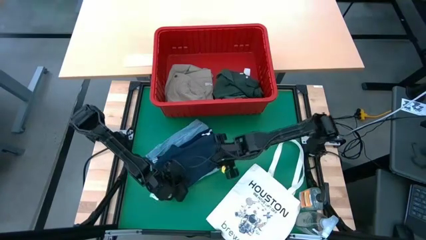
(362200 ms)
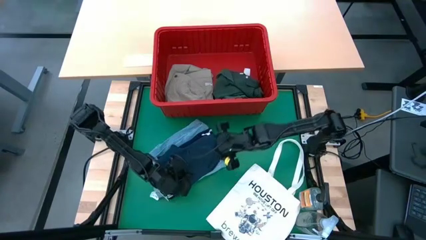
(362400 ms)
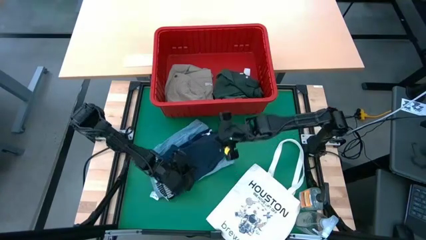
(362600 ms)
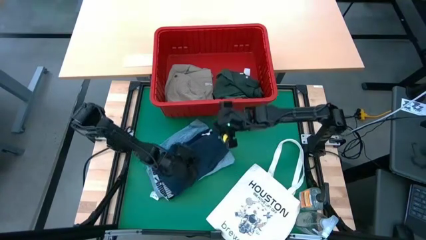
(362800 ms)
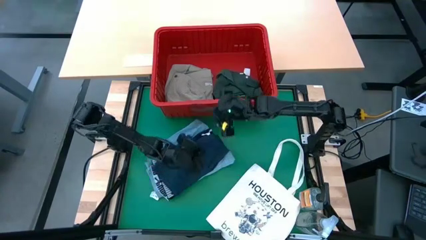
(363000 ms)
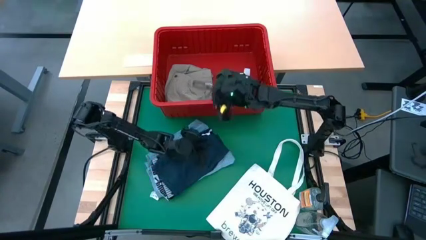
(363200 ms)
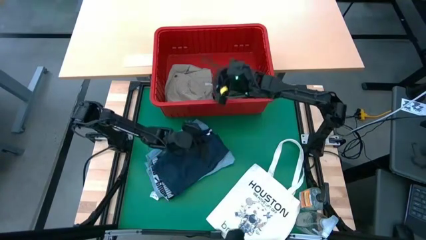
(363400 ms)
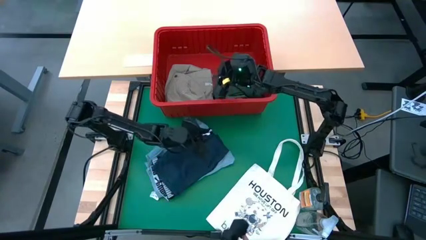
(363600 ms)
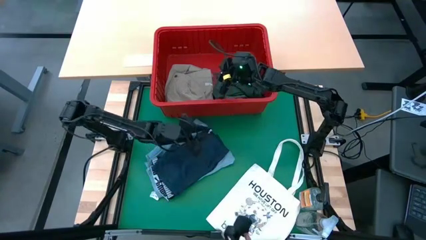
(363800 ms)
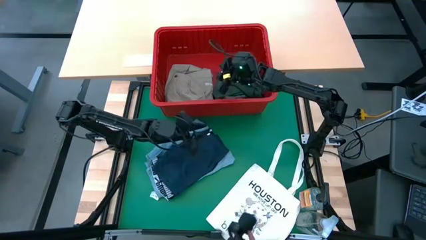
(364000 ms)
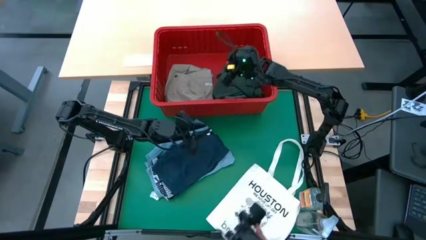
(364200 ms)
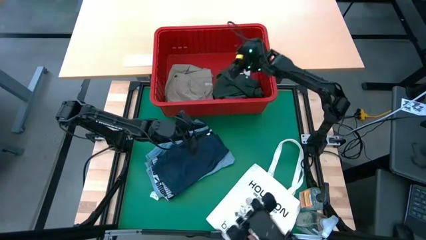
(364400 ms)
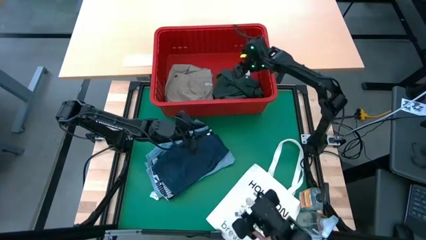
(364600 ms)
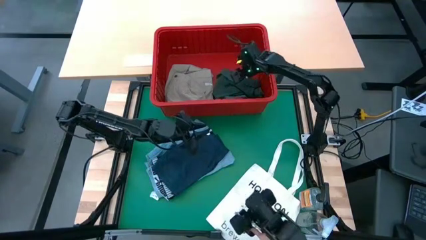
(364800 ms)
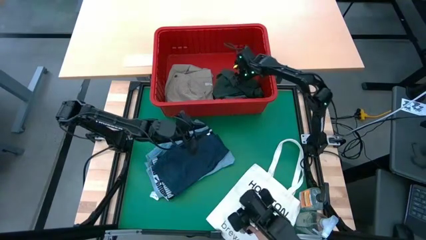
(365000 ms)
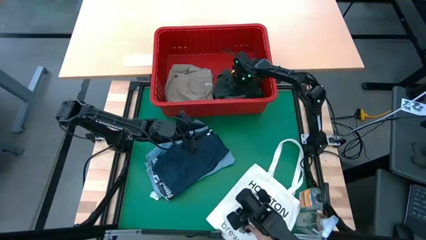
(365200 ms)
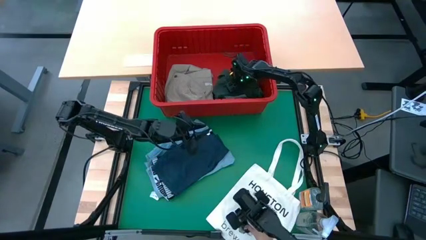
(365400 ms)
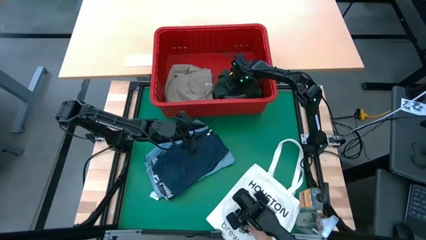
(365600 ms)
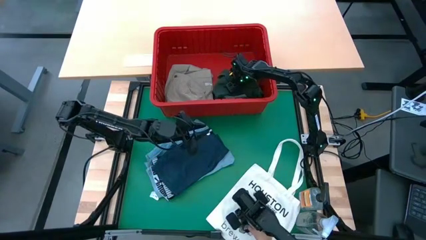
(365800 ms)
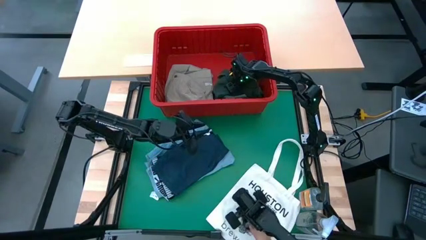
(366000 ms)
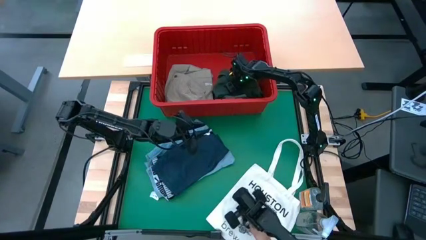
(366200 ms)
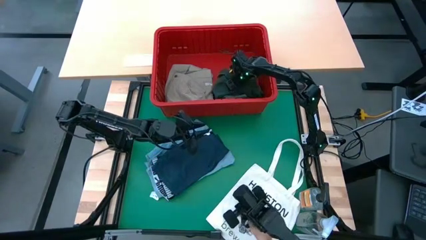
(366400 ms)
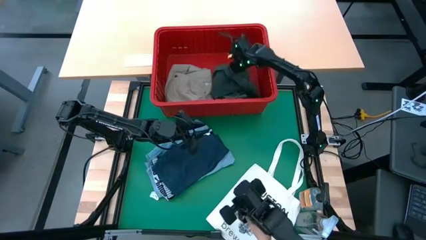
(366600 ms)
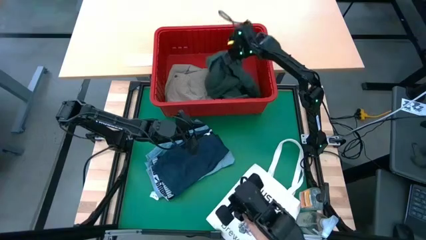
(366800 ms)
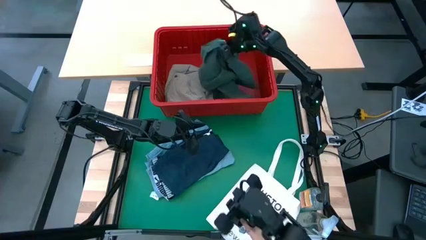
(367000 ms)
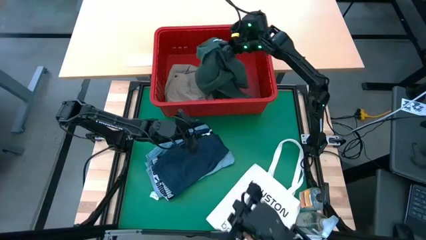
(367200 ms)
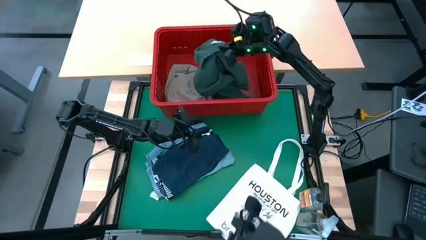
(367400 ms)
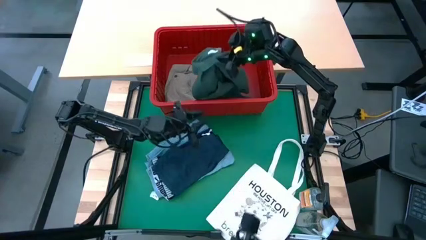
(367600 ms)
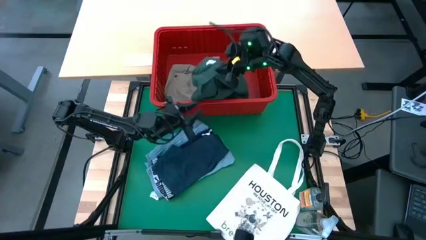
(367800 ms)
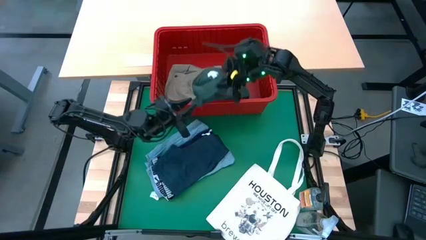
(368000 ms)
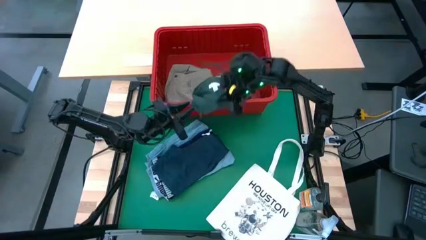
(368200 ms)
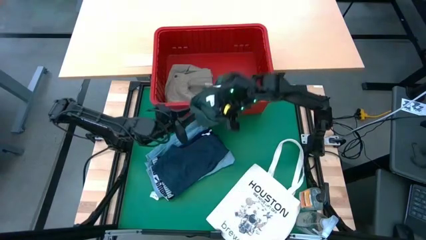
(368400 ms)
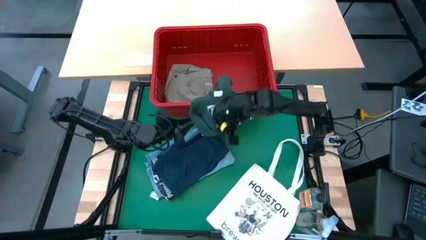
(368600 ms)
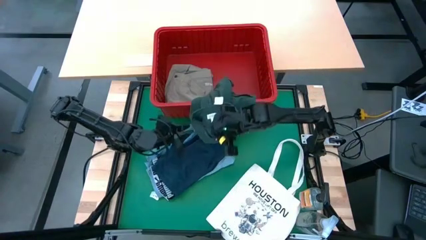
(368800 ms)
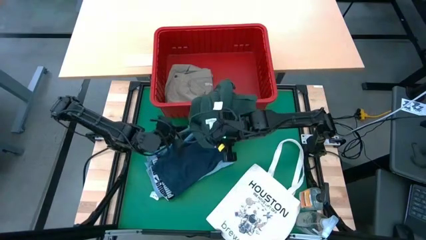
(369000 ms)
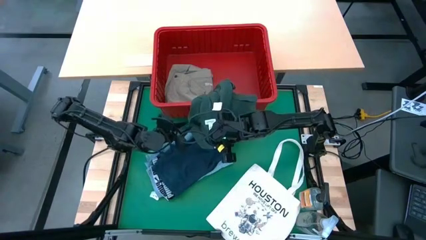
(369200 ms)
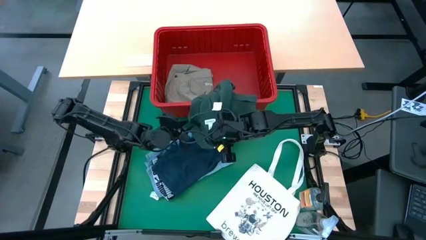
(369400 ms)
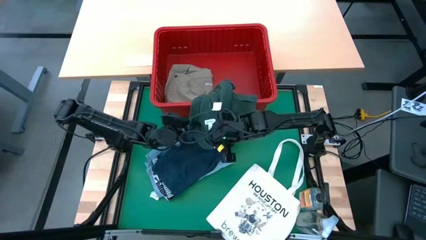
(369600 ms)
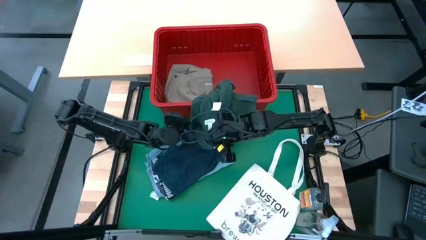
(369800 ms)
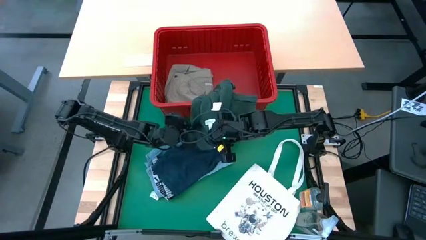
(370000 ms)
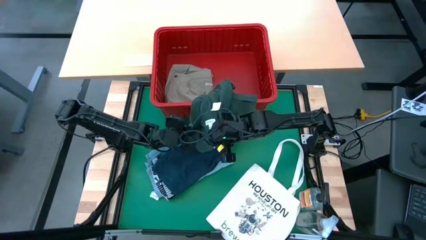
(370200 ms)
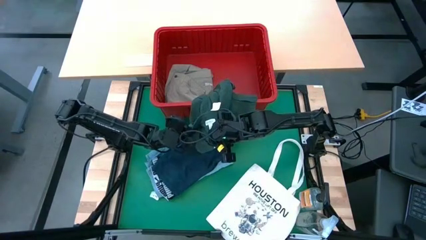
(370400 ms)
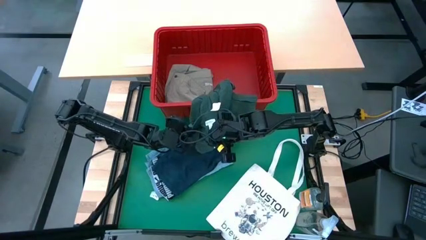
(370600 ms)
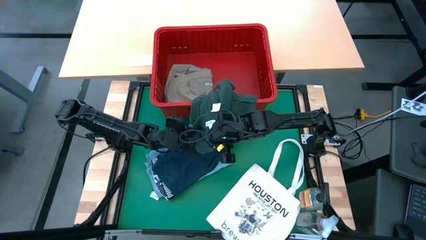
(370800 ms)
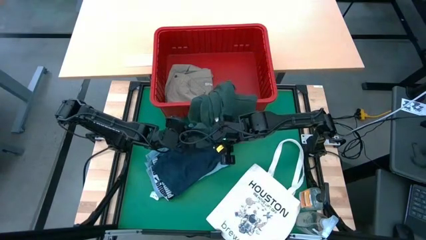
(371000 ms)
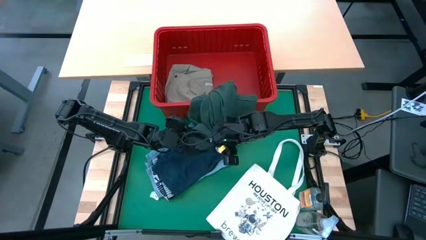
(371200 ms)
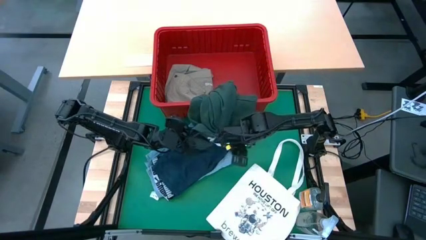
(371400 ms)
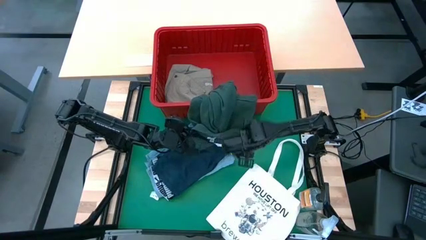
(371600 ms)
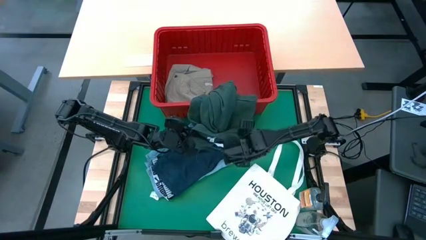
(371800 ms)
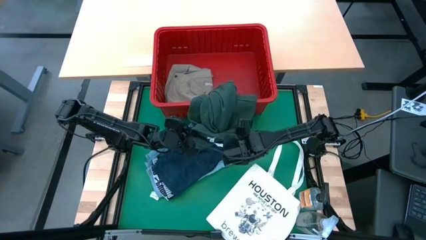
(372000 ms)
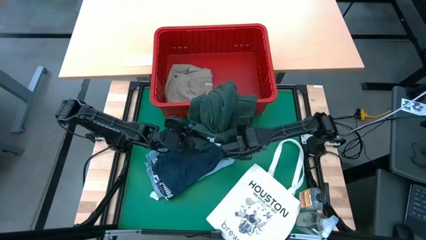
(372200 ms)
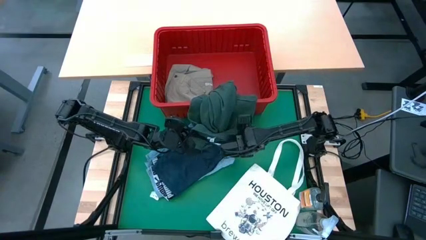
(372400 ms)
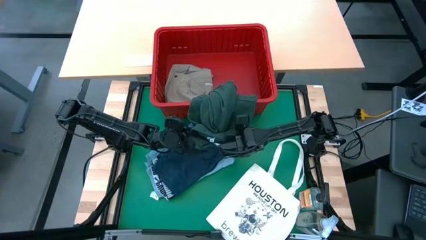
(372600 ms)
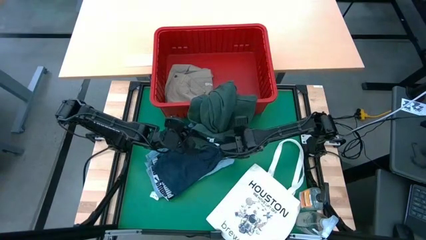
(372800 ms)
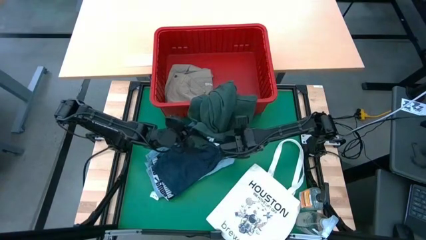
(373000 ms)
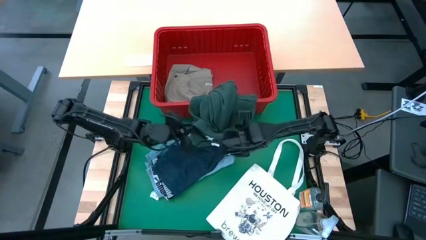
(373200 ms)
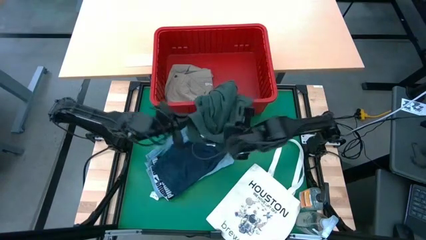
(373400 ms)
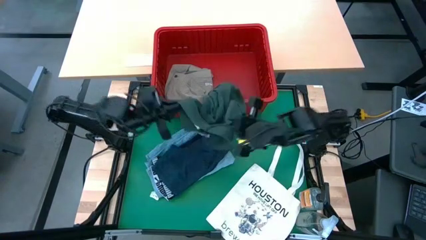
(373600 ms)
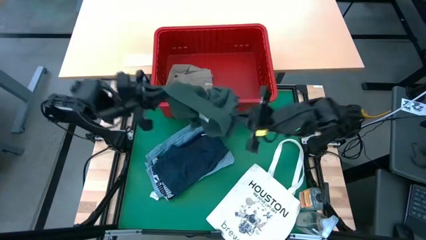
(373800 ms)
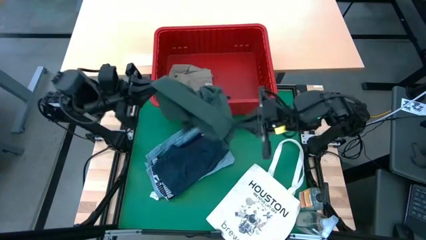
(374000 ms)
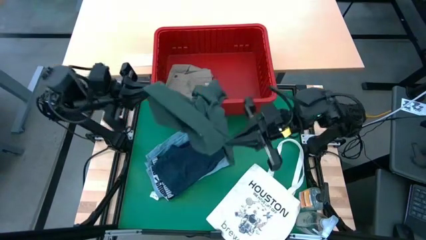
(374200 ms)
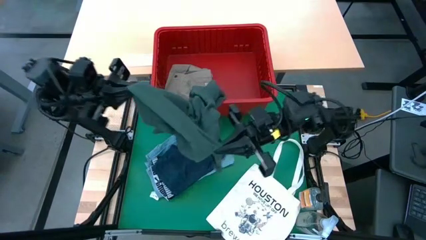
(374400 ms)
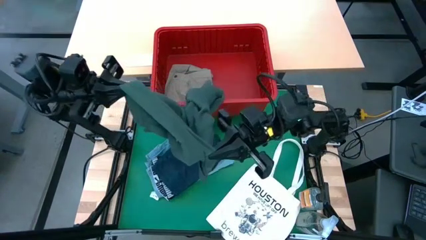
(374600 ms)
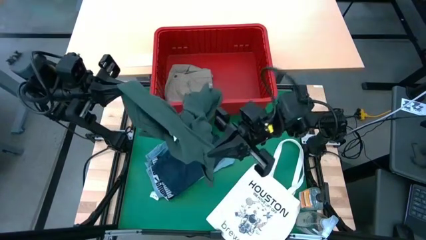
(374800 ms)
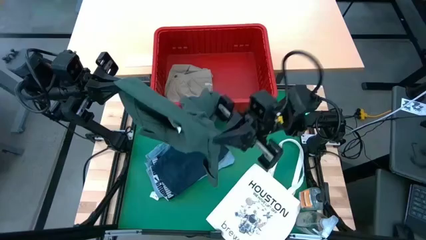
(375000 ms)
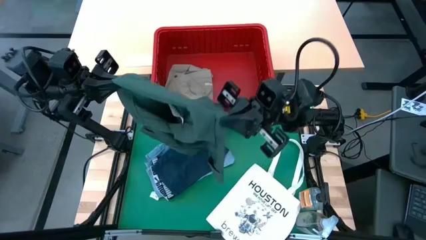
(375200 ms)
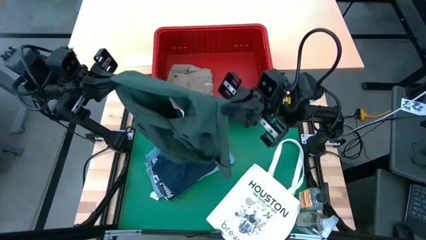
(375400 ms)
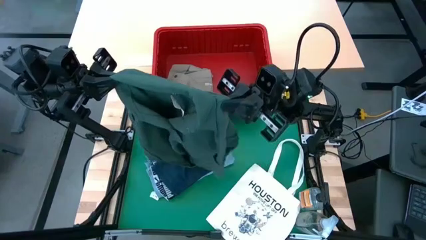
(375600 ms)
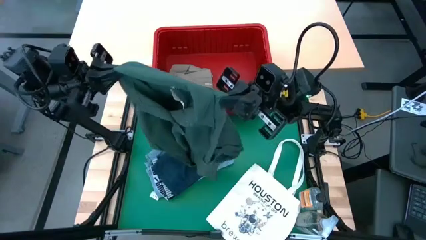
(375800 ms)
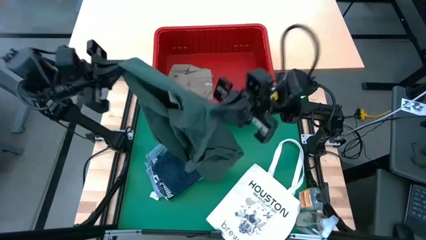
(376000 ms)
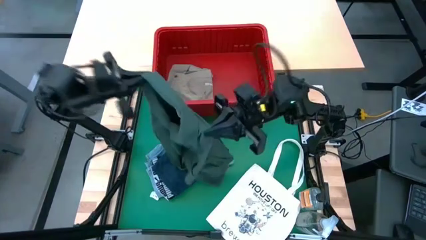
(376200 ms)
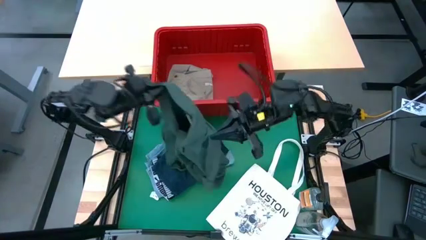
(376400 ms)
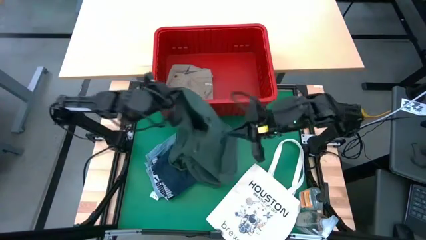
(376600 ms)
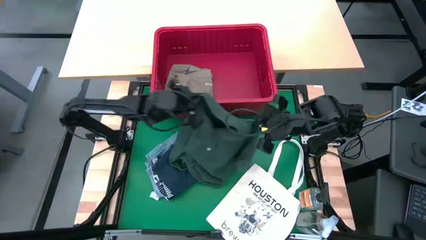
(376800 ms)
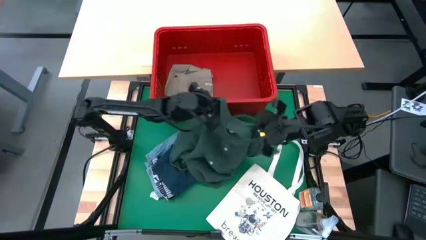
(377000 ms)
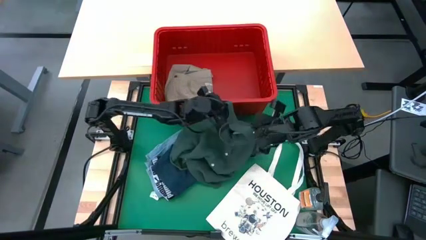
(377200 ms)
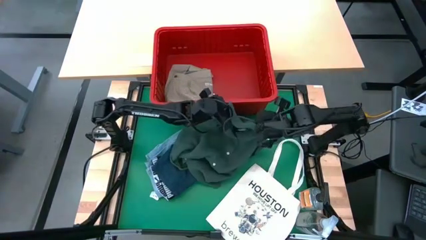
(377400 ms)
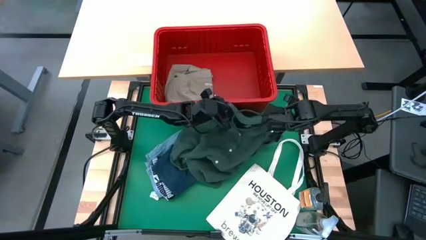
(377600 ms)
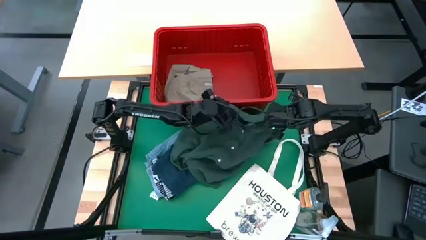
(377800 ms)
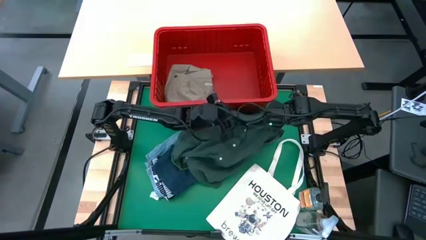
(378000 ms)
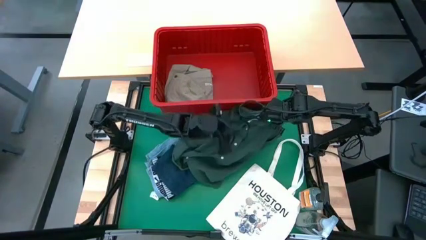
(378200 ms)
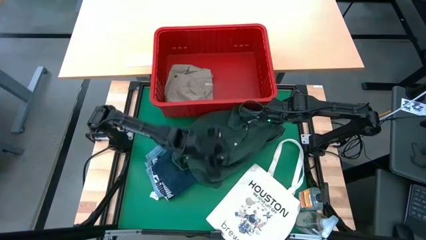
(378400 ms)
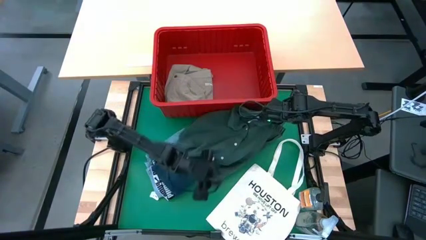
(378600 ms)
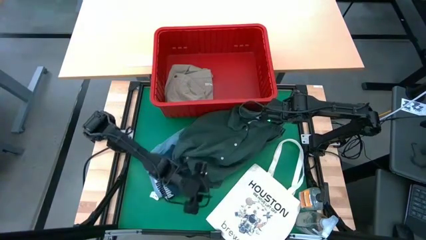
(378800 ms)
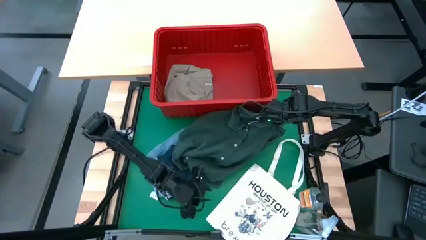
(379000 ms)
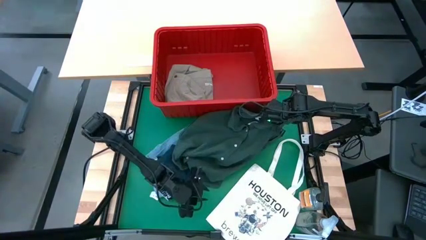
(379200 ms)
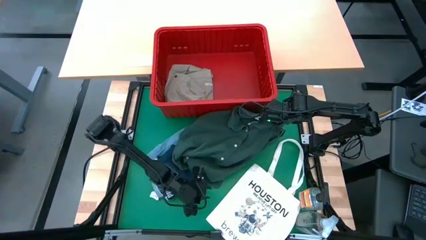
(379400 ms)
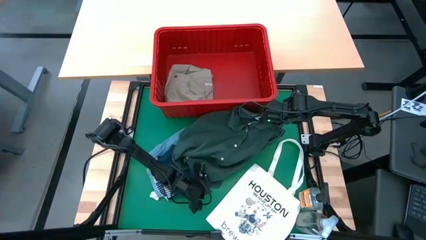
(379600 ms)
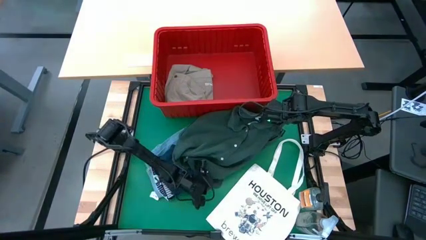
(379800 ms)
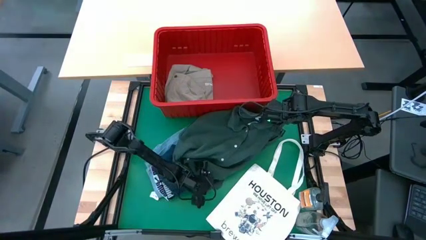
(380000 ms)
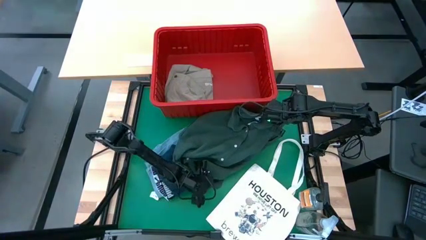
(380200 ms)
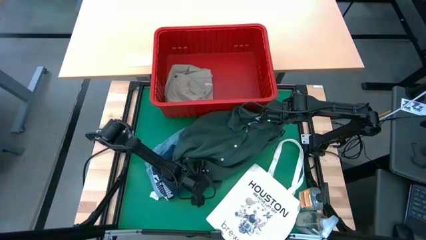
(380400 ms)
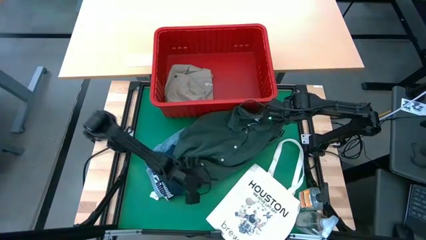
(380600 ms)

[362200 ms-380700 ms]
Task: Fold Laundry from Bin
Fold the dark green polo shirt
